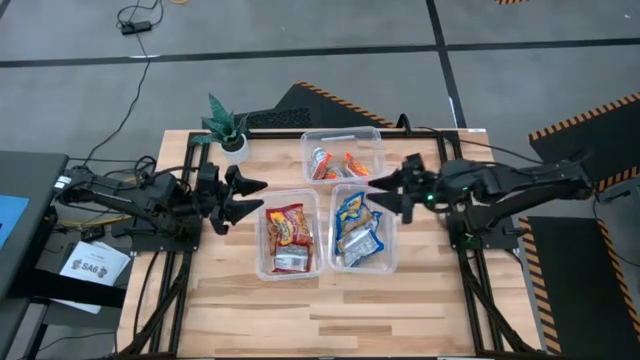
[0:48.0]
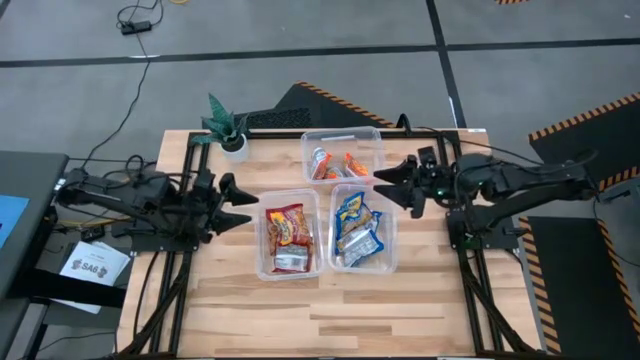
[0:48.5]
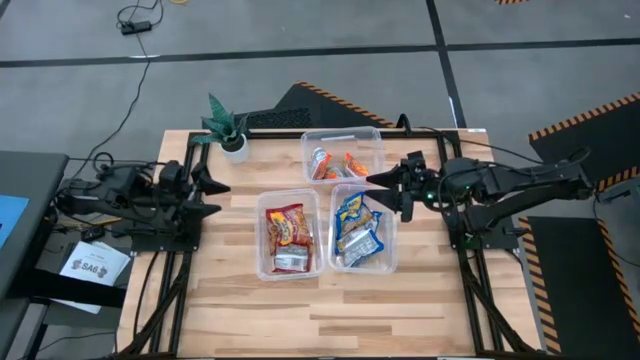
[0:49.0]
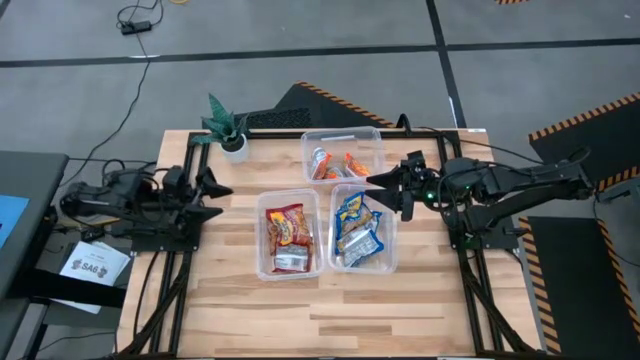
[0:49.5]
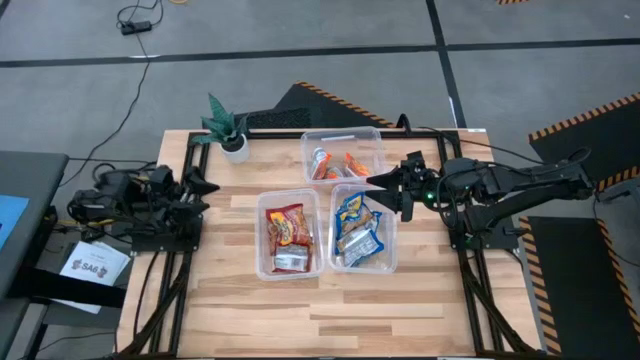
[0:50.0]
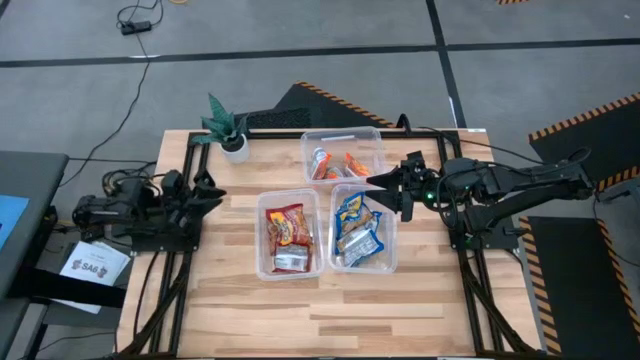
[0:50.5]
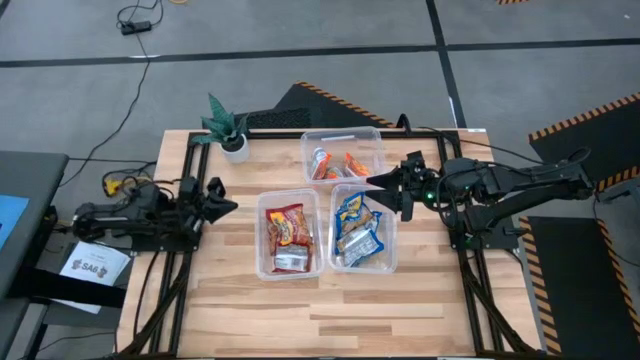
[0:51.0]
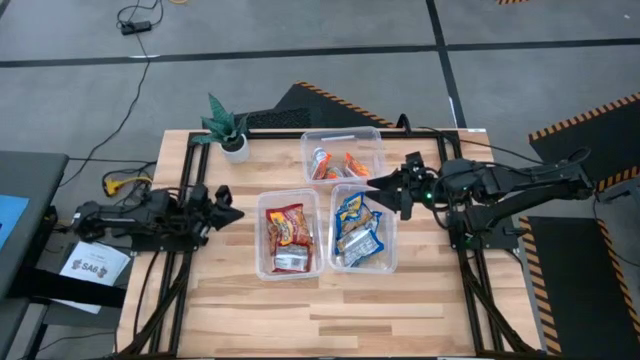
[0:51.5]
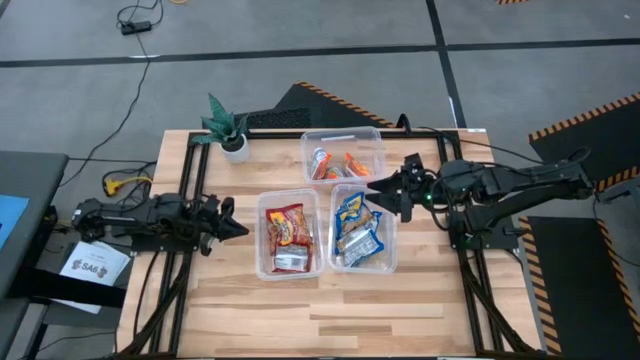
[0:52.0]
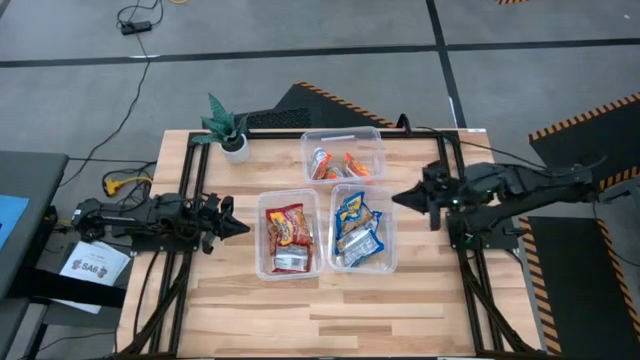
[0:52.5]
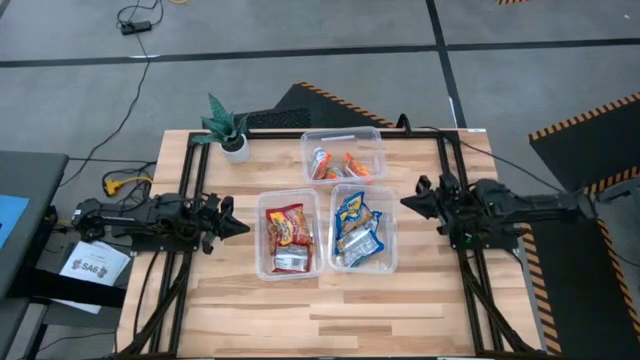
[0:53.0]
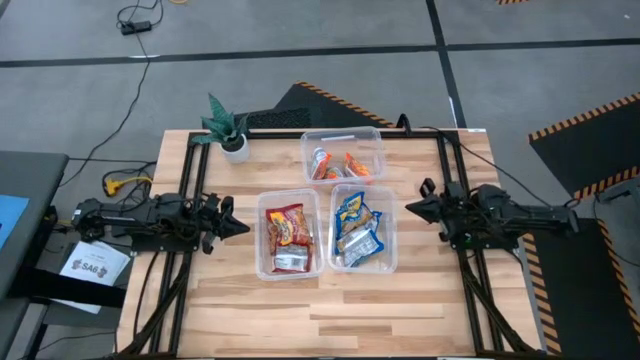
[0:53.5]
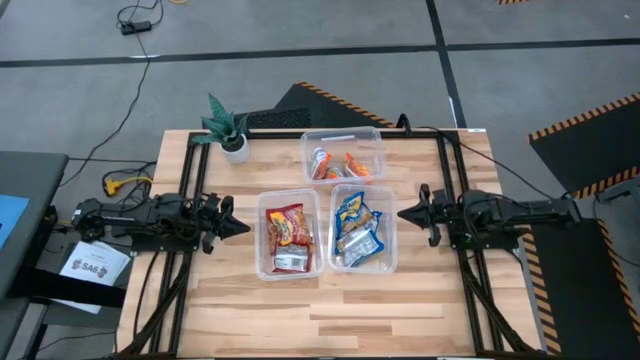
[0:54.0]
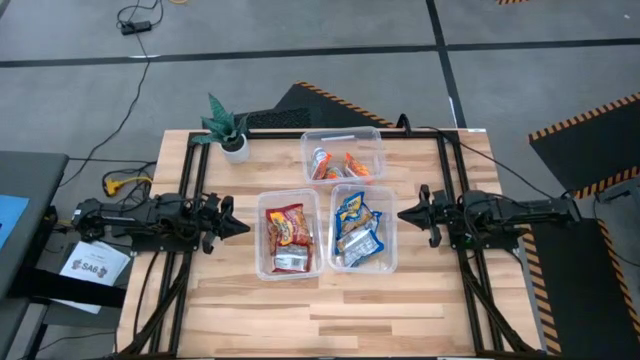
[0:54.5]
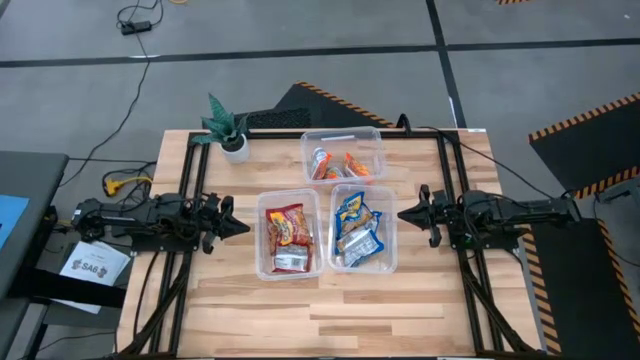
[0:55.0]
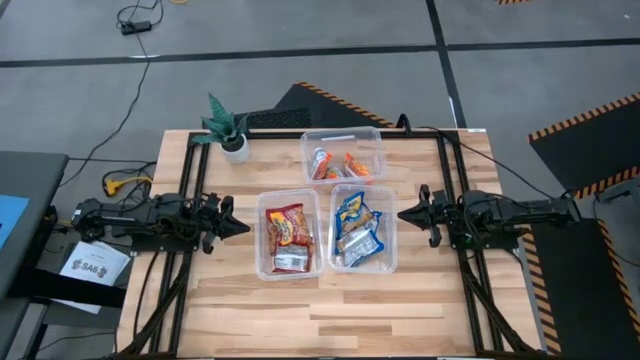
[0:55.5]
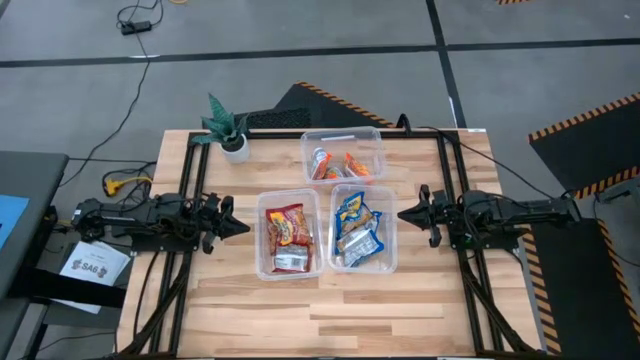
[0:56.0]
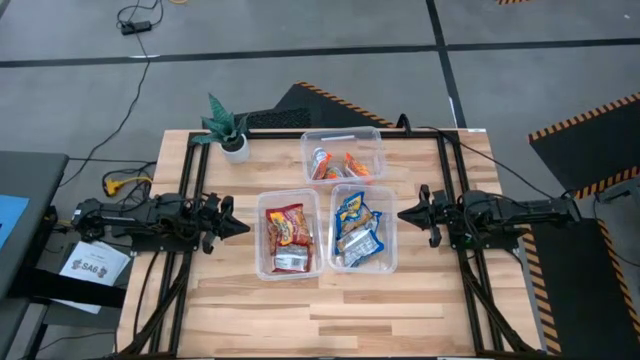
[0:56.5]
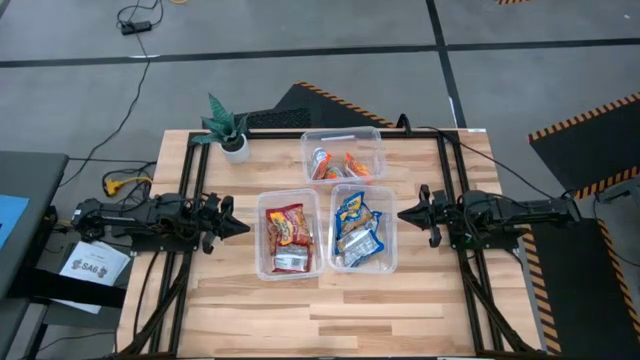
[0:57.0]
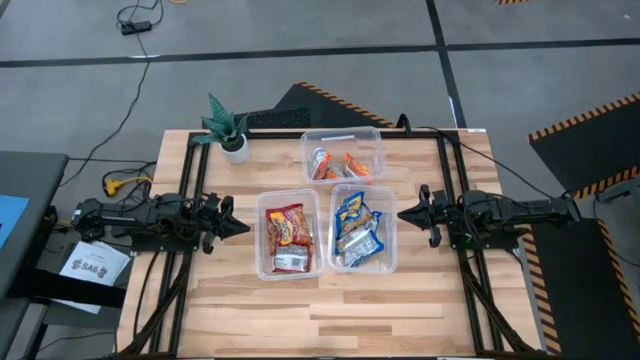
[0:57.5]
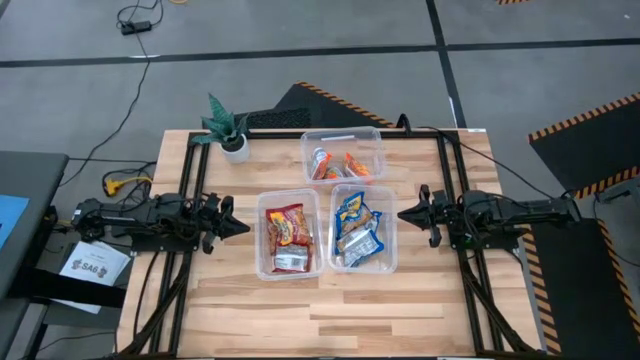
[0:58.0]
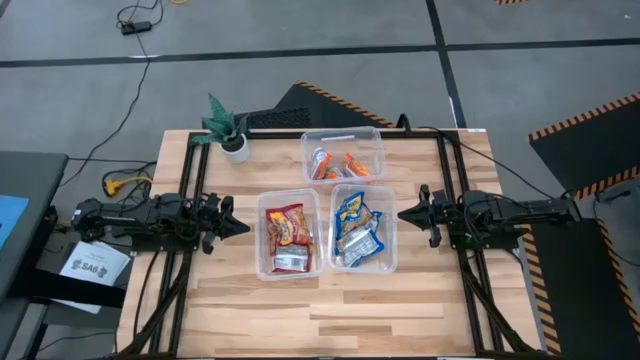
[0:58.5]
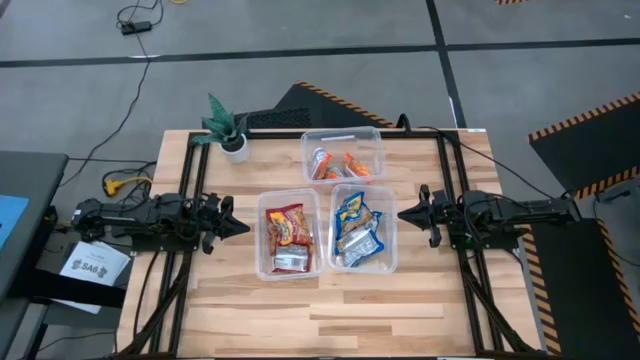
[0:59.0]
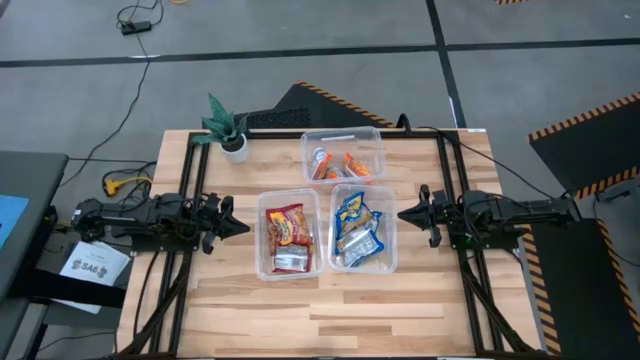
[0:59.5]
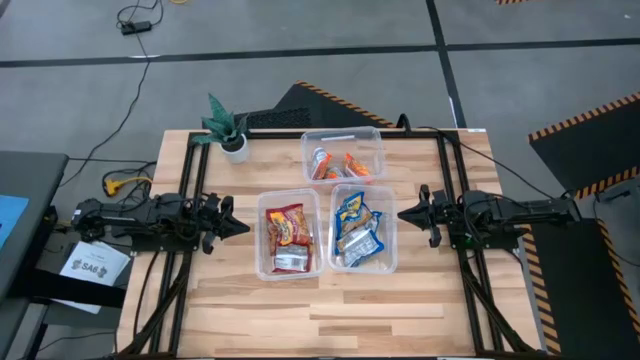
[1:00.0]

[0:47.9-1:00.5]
Task: Sort Maruchan noodles
Return to Home Position

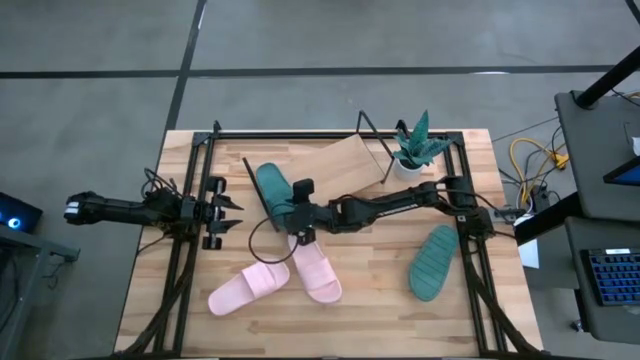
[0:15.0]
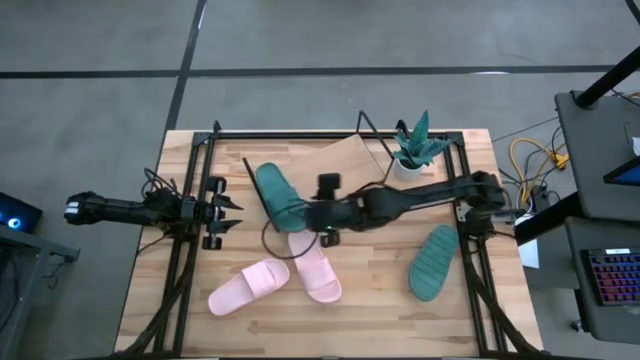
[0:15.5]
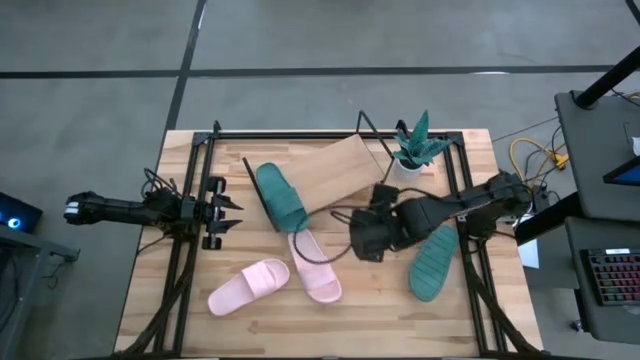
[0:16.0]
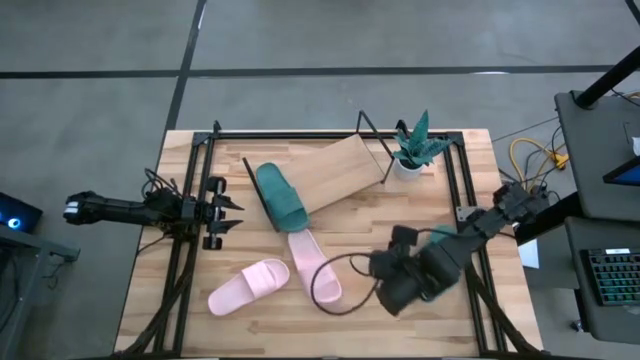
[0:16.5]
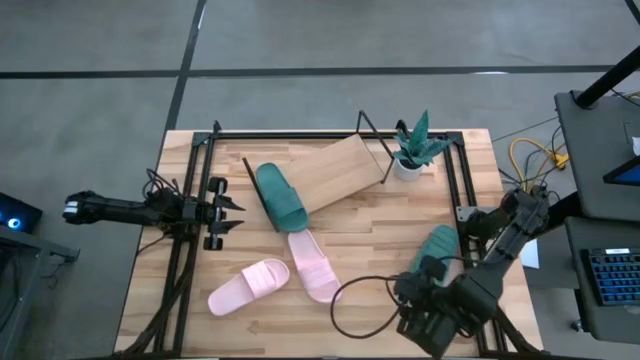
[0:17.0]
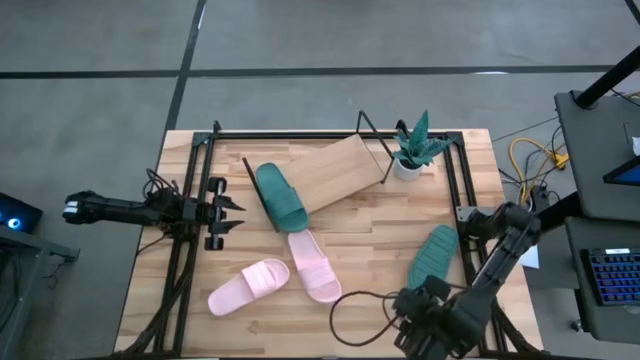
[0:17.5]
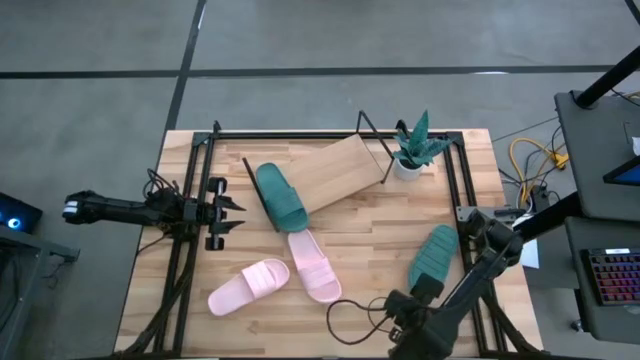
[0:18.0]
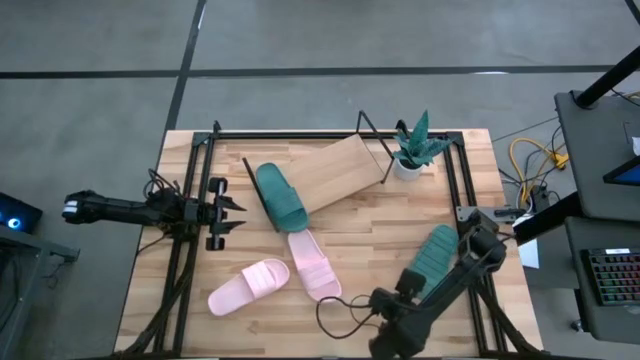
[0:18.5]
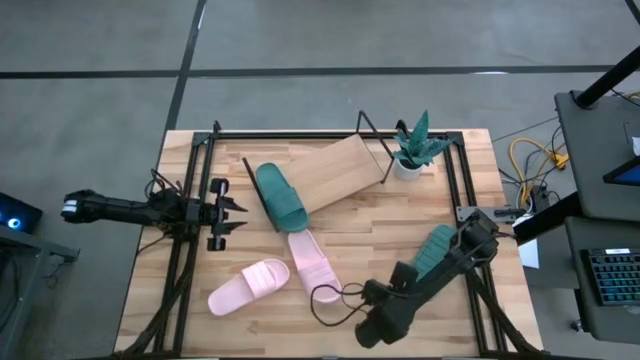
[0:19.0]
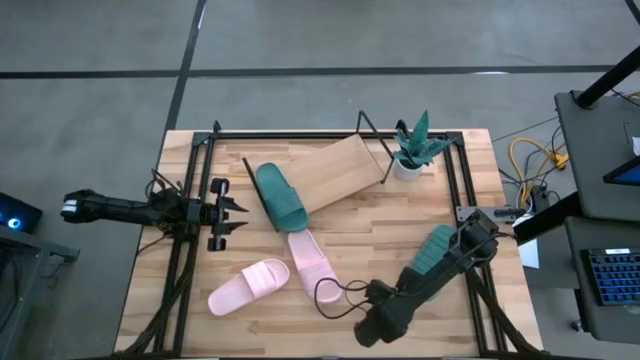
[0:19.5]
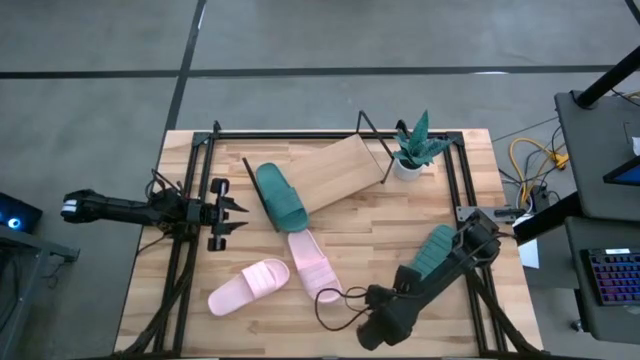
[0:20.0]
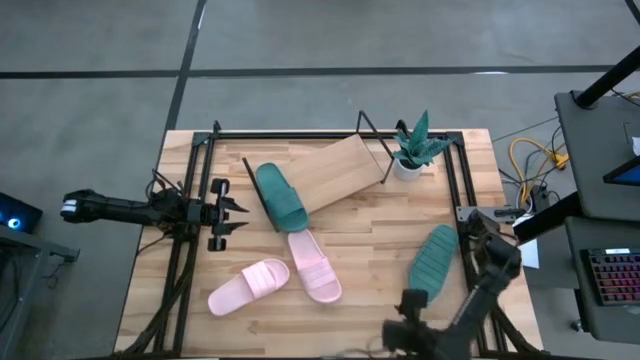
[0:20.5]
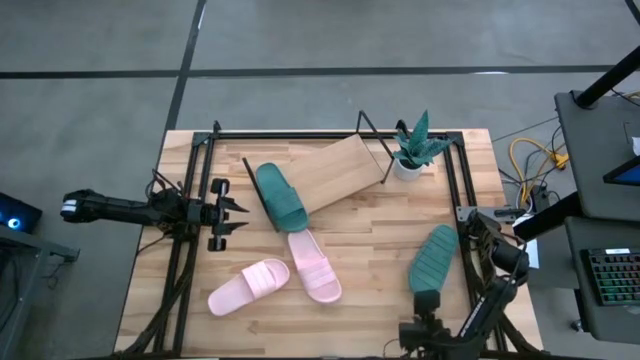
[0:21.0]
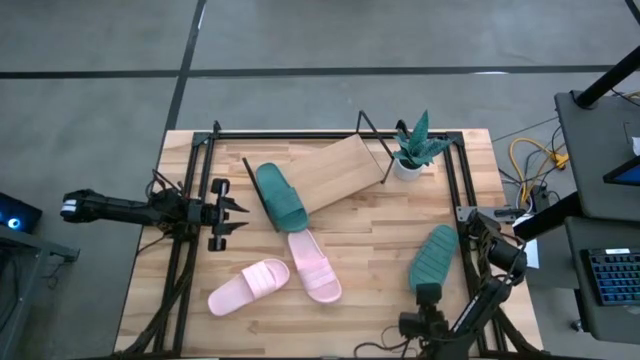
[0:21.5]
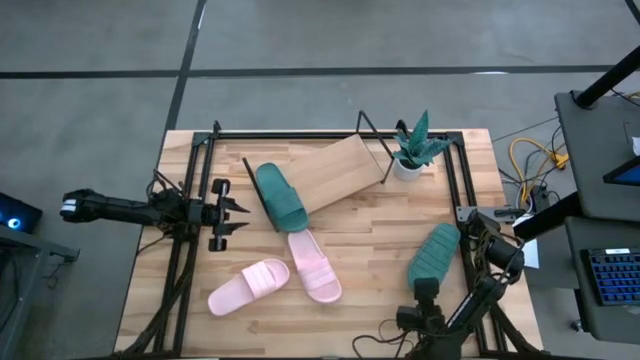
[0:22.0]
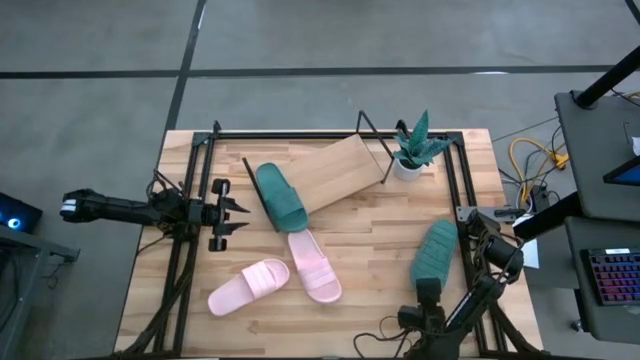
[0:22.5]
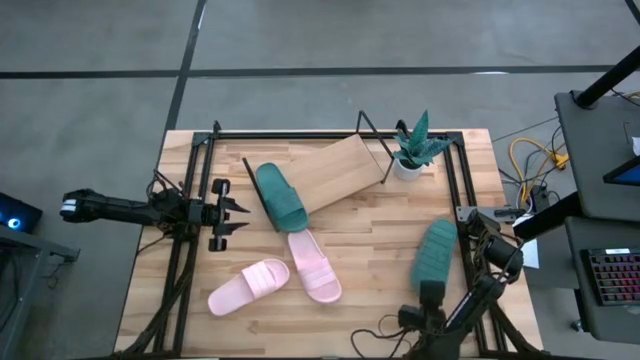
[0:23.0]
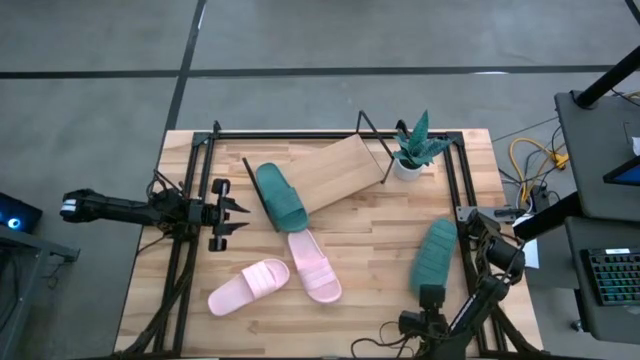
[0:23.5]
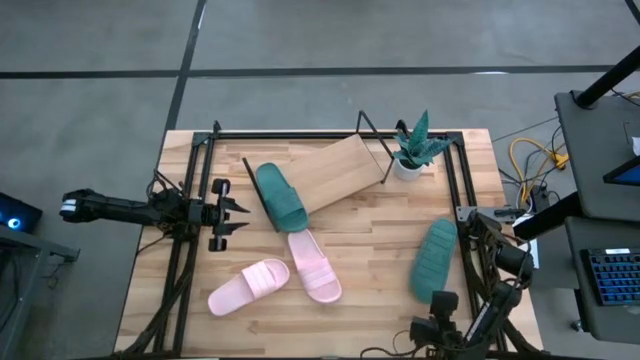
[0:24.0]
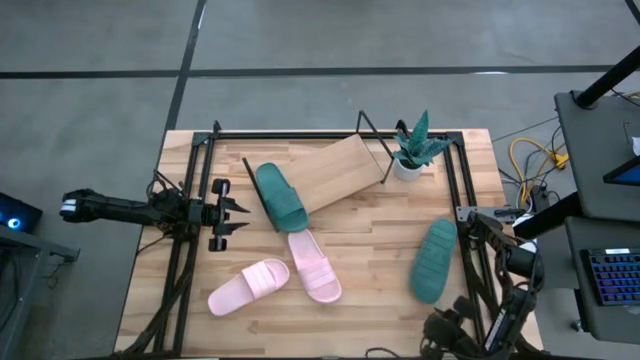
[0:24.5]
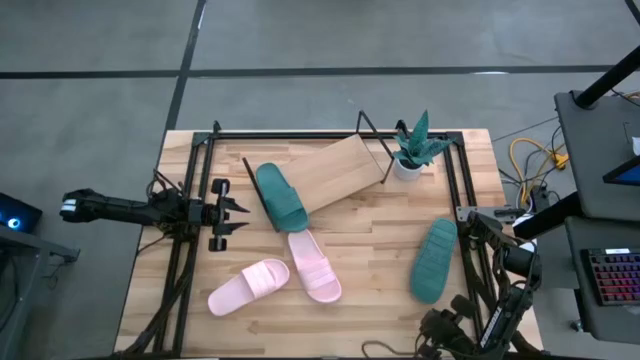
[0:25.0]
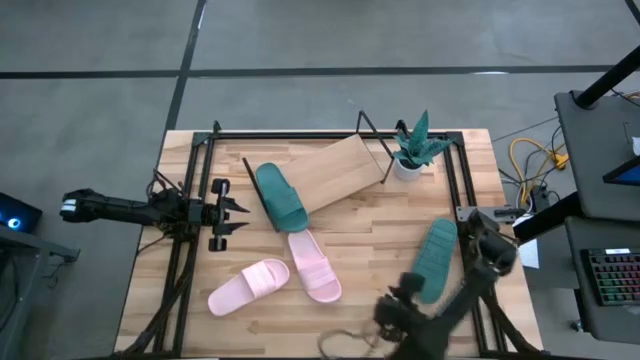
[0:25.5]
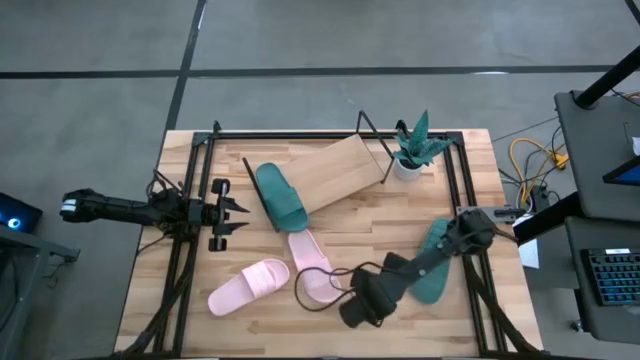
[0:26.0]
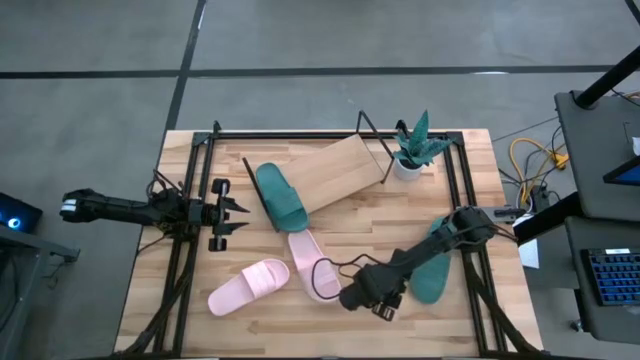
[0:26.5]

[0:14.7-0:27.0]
Task: Pick and place slides into the shelf
Put the green slide on the shelf
